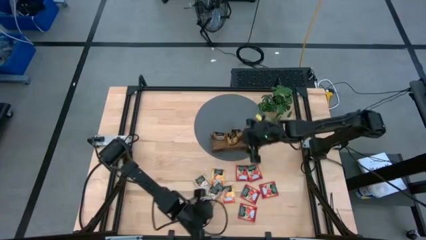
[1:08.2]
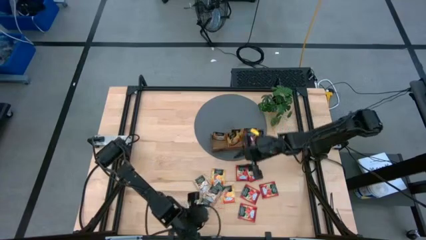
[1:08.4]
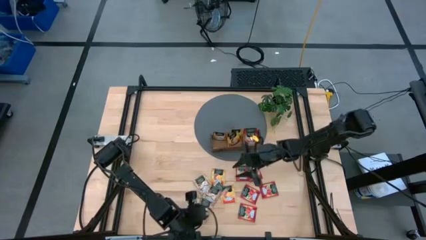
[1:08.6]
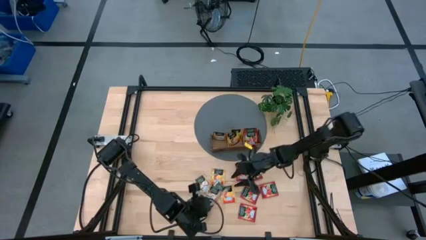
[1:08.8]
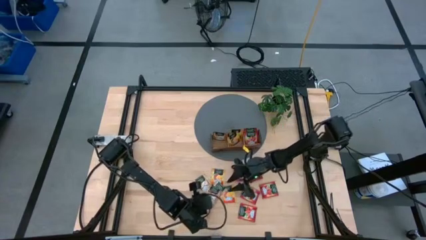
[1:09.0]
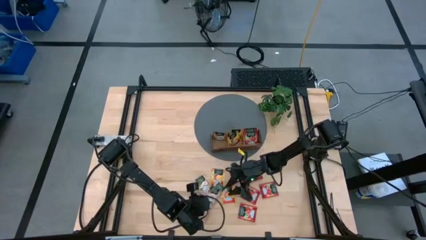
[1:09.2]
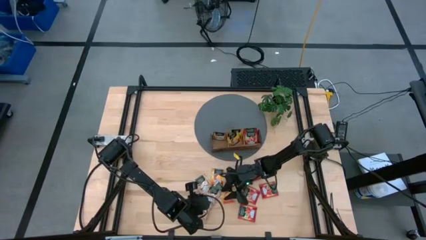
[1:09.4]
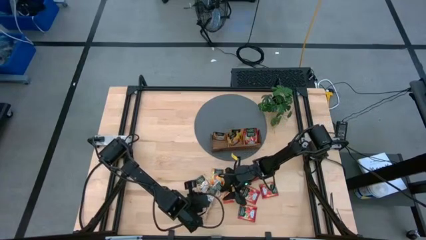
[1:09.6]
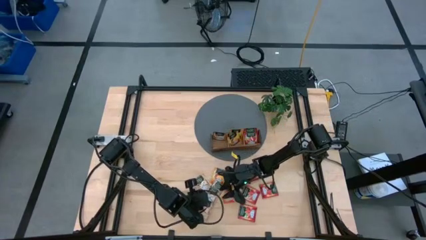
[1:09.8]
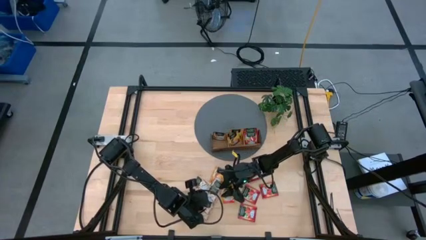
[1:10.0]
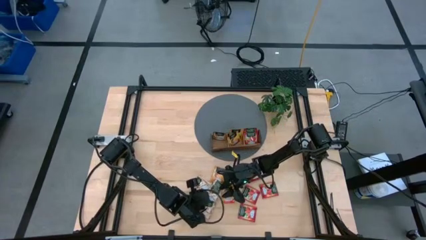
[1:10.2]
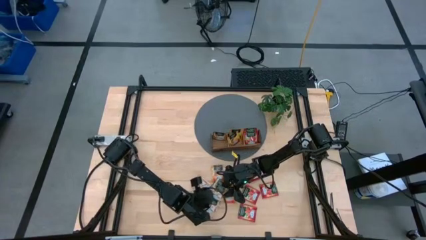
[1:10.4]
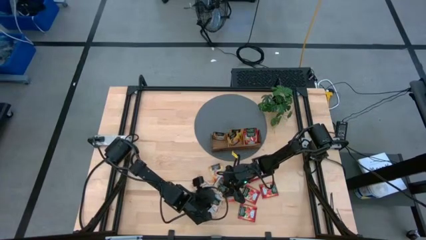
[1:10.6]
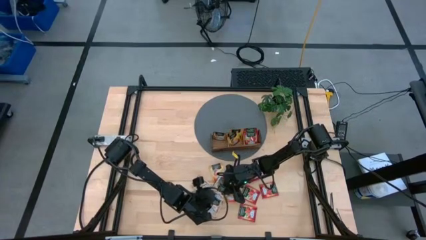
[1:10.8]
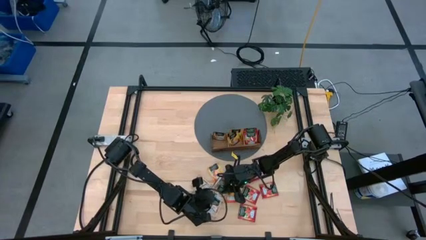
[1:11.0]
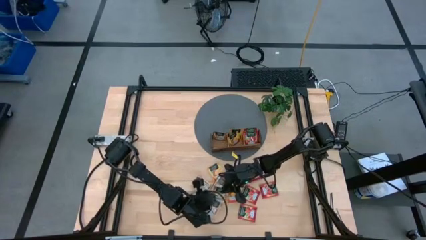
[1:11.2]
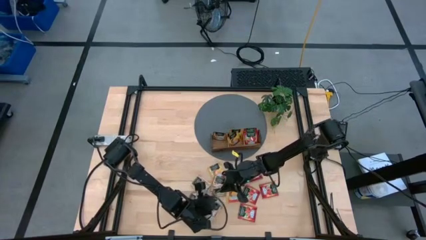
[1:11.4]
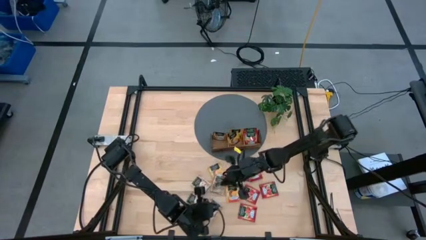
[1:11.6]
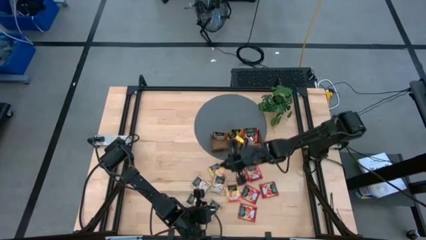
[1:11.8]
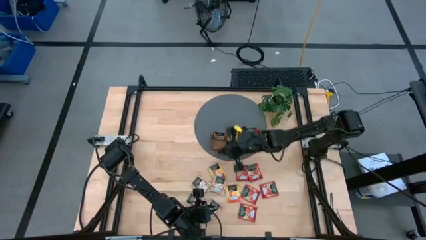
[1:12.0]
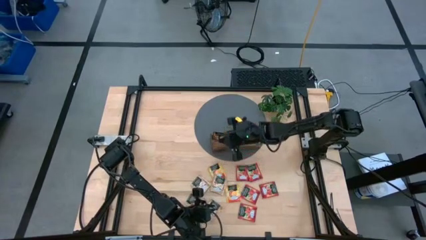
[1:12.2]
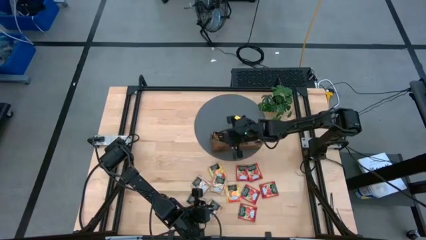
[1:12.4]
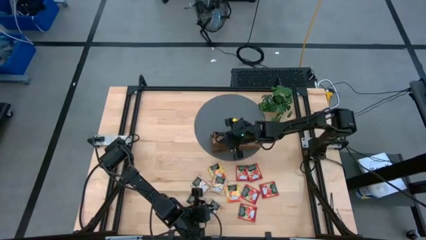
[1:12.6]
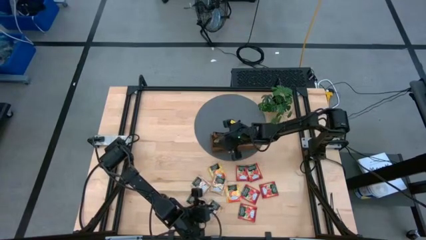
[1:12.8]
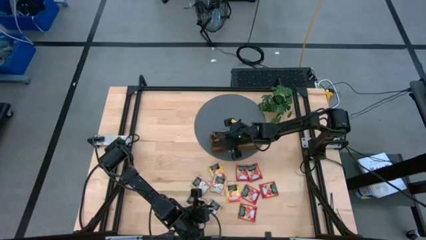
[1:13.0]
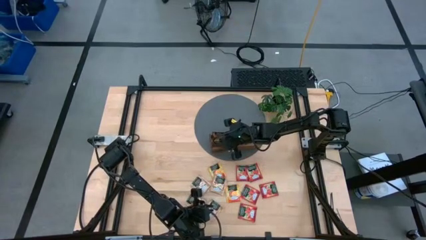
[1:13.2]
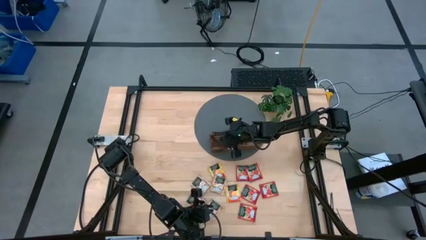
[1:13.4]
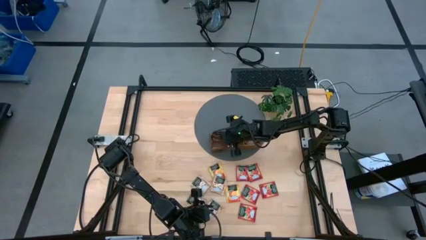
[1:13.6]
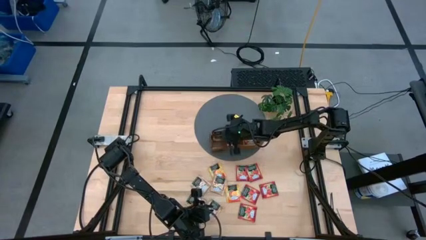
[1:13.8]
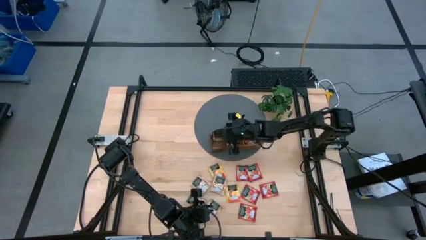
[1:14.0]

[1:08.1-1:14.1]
Task: Pick & Place Tea
Put the brown tea bag into the left section of the wooden organizer

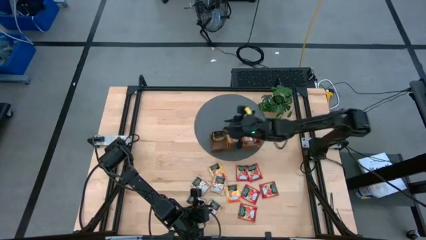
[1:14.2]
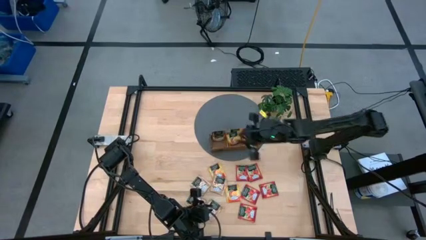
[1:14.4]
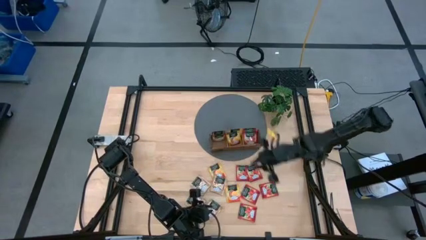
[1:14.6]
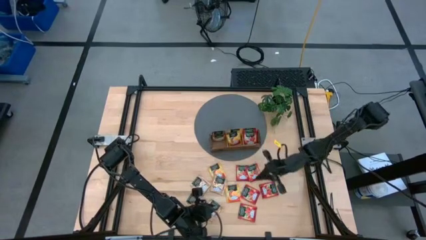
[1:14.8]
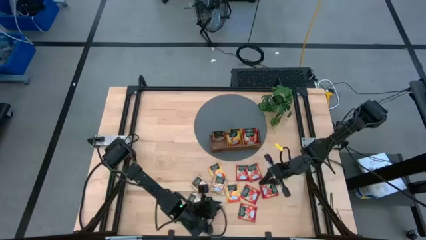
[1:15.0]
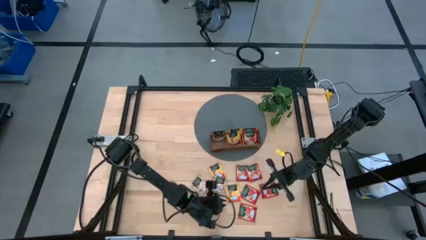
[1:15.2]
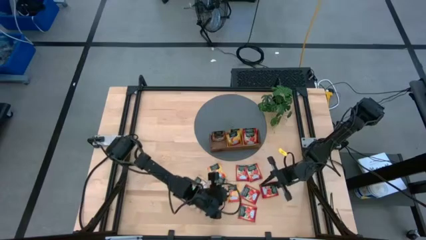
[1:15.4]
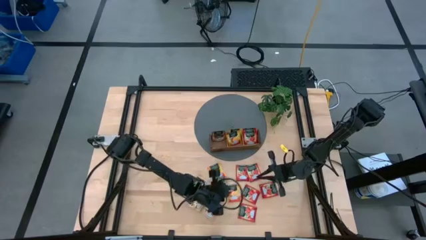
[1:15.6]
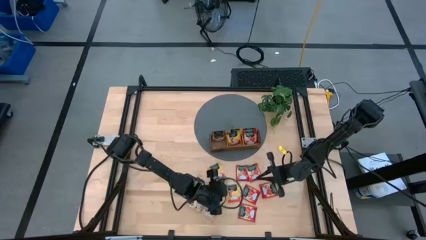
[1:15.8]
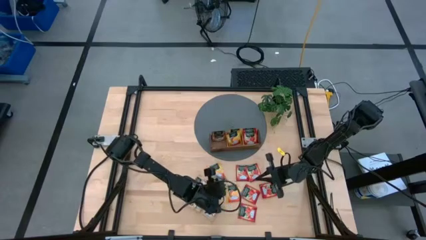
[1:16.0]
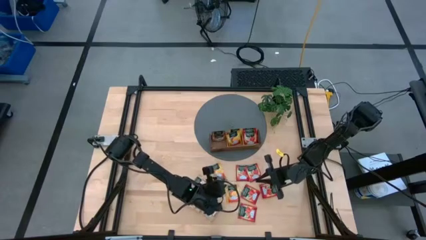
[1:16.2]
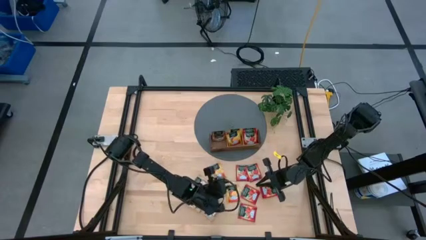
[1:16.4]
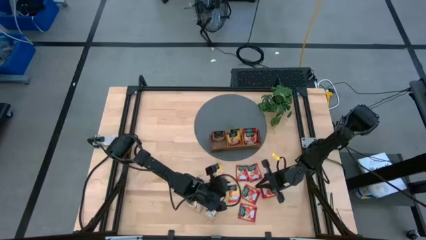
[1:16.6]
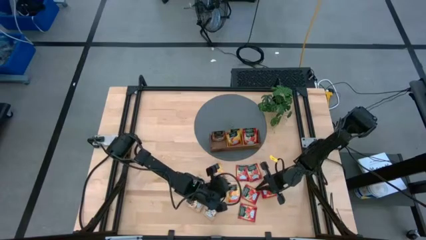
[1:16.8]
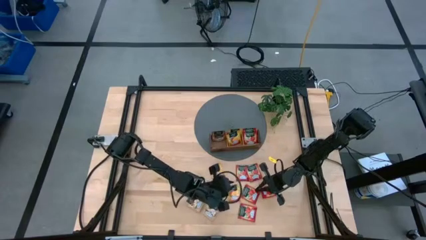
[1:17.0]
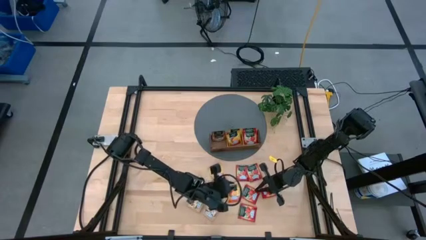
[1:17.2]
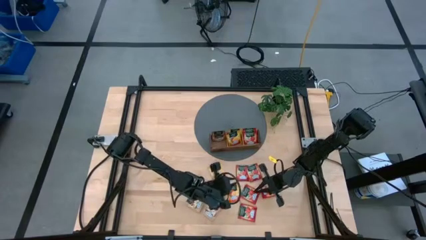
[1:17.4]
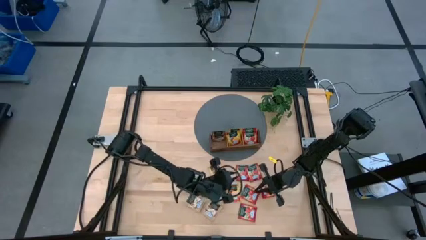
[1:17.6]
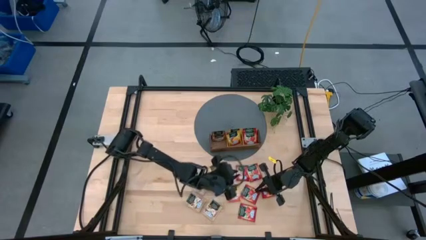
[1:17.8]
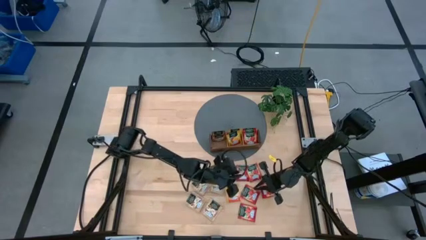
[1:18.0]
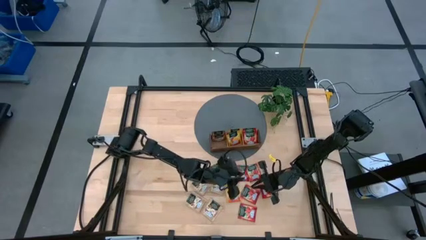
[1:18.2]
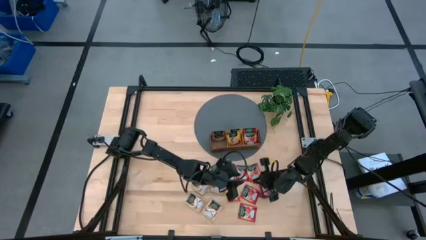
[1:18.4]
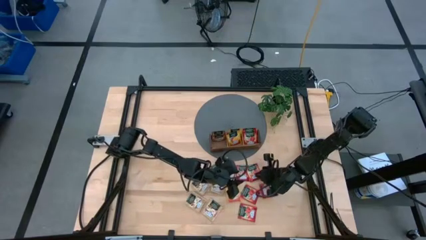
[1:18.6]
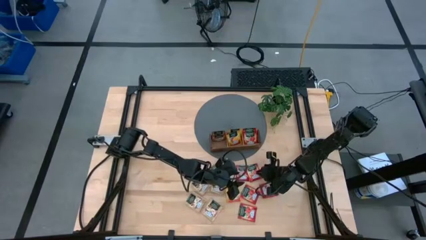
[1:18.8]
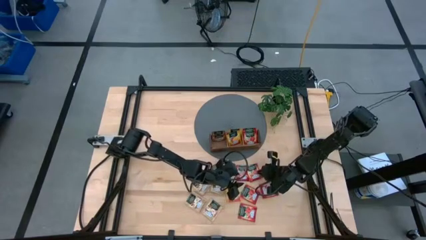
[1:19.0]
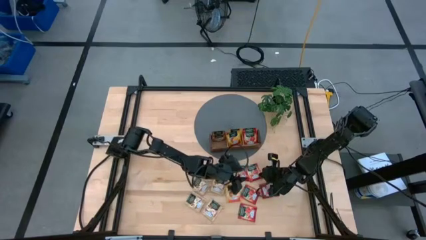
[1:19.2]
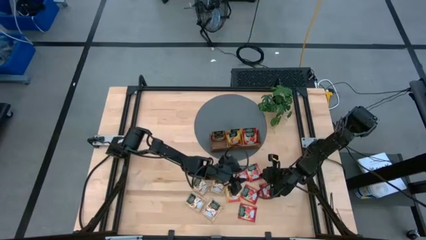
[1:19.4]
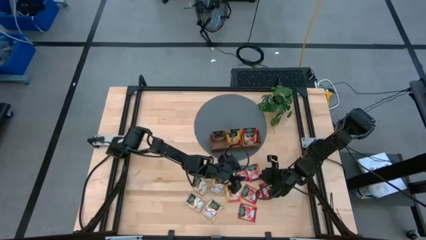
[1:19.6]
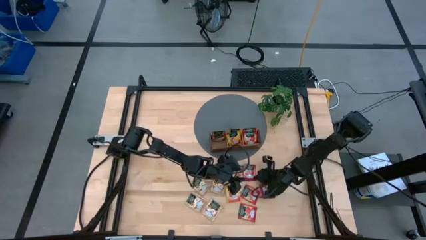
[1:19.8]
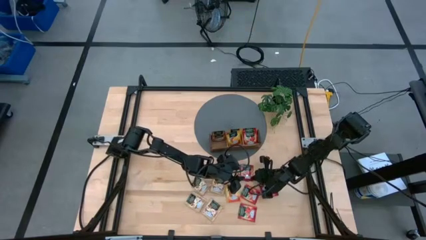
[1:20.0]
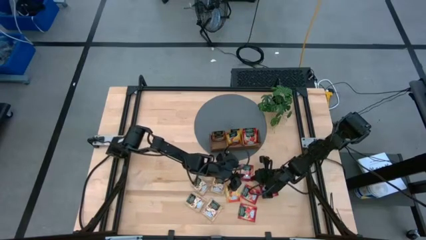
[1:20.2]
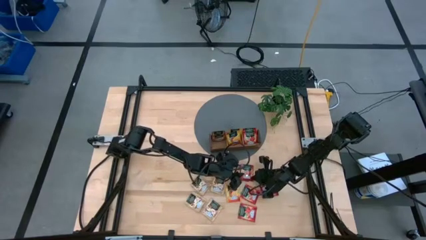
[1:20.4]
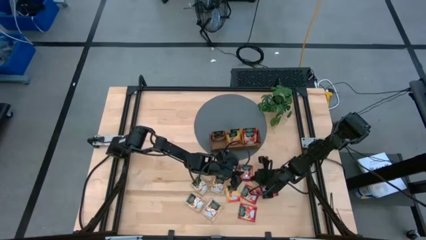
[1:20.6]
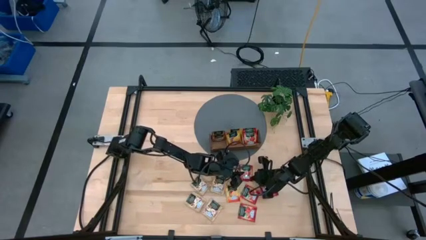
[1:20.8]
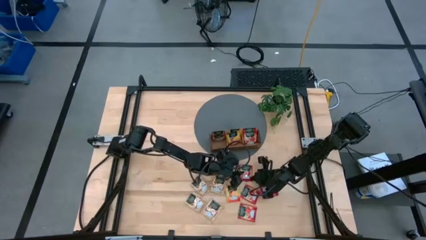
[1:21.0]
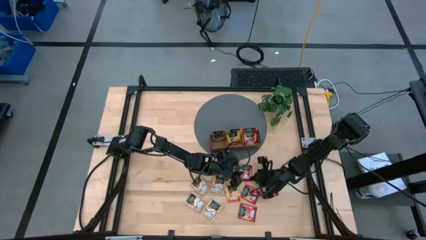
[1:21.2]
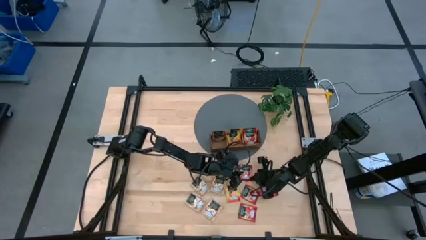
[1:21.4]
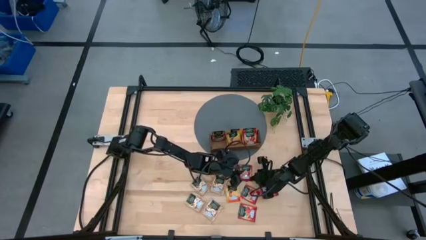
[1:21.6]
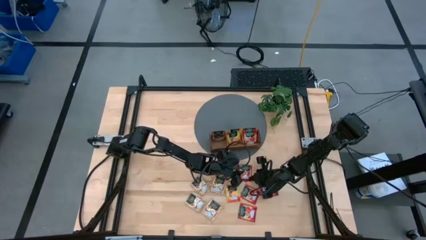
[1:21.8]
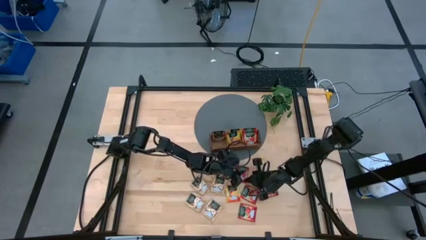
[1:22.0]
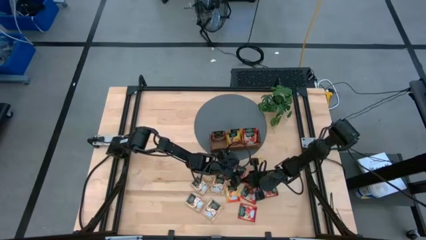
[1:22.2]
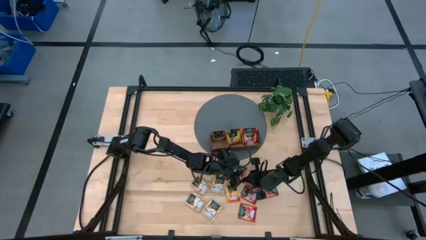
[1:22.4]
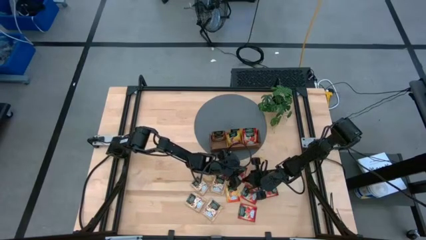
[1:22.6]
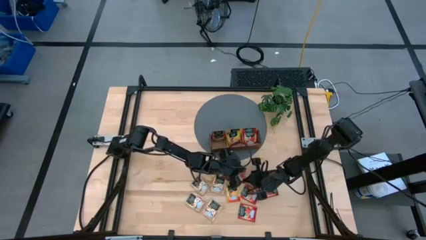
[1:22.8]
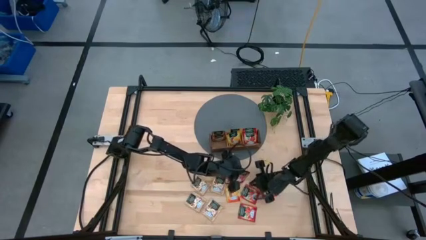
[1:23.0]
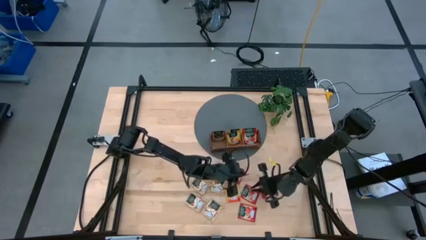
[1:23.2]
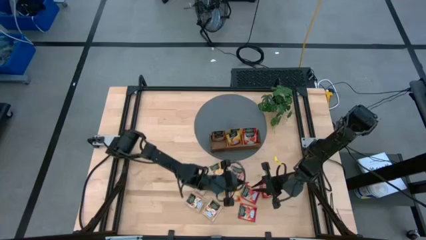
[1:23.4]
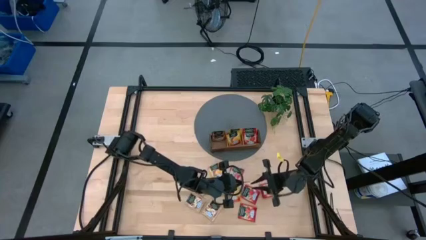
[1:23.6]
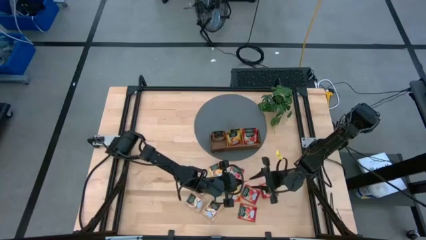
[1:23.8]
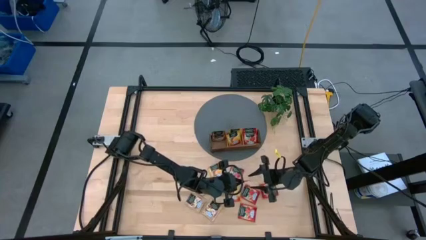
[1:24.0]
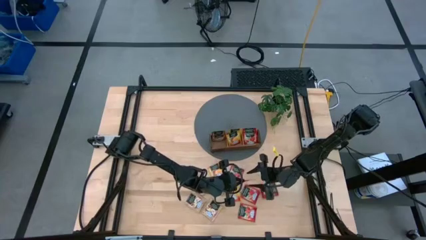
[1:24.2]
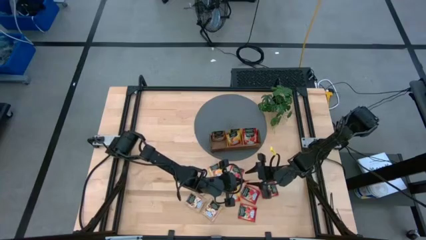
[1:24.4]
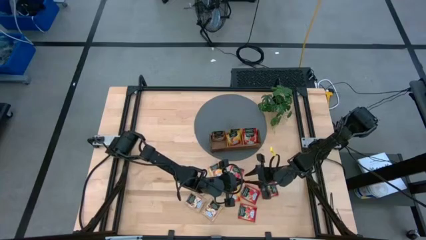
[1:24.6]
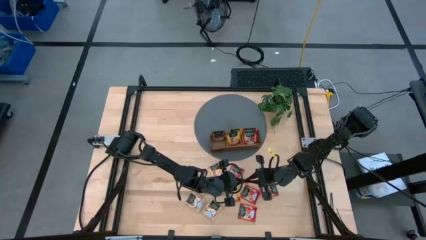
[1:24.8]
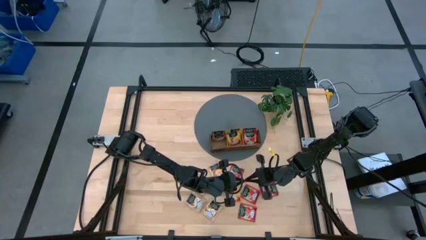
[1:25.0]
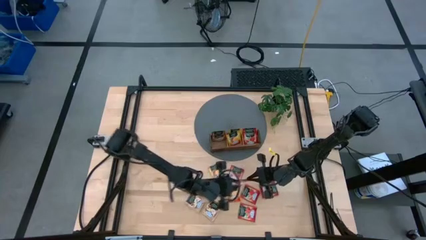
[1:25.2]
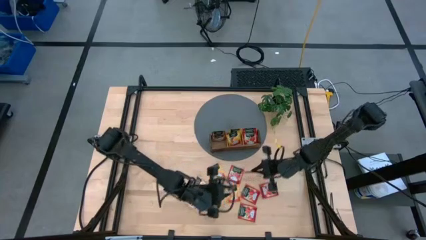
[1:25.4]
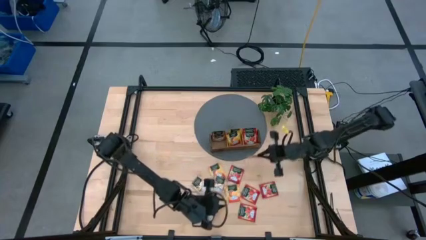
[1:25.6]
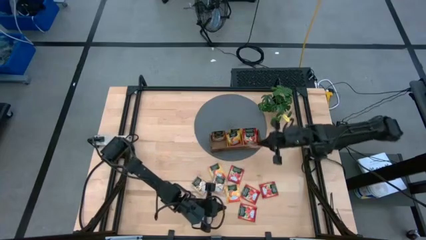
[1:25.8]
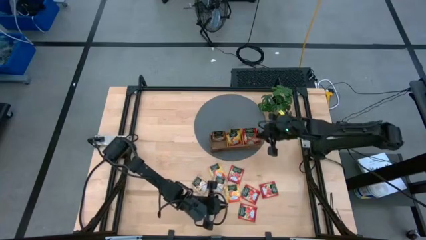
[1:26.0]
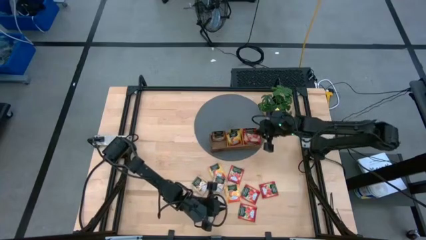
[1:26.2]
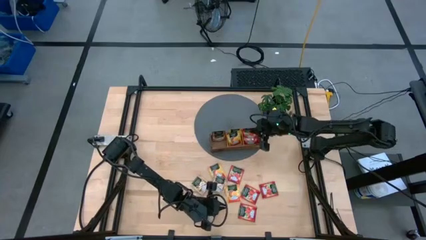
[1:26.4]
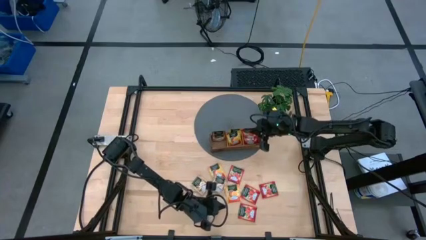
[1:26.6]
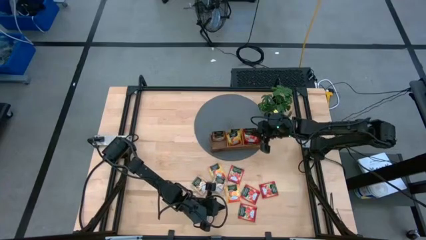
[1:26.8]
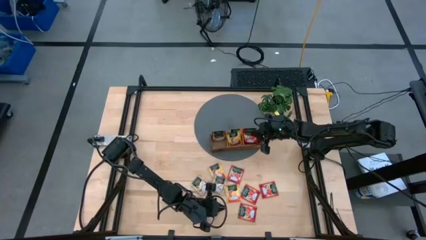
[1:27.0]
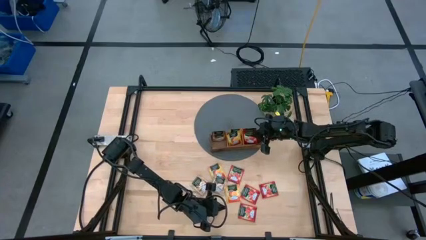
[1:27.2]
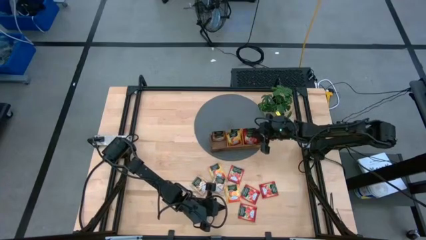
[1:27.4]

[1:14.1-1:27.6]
Put the red tea bag into the right section of the wooden organizer
